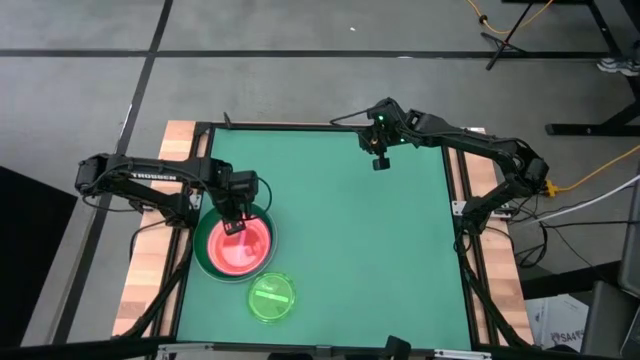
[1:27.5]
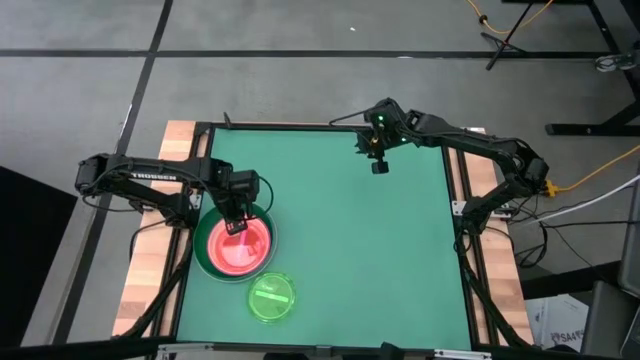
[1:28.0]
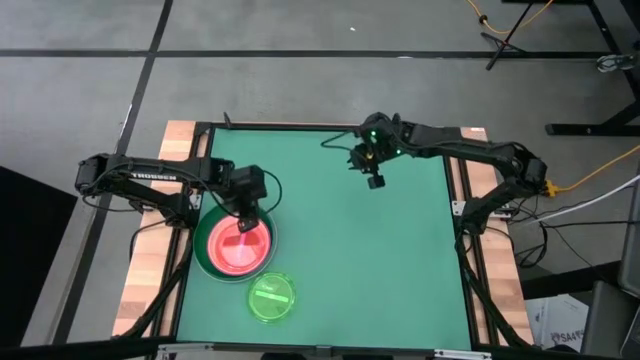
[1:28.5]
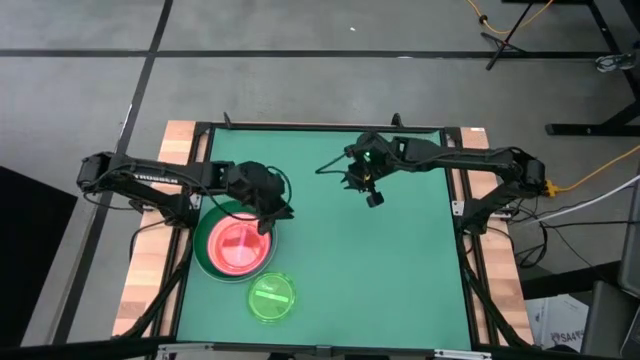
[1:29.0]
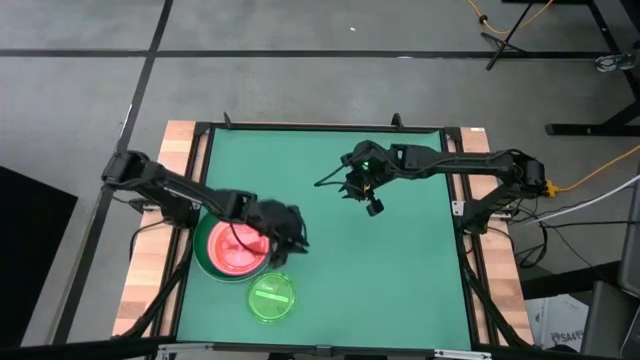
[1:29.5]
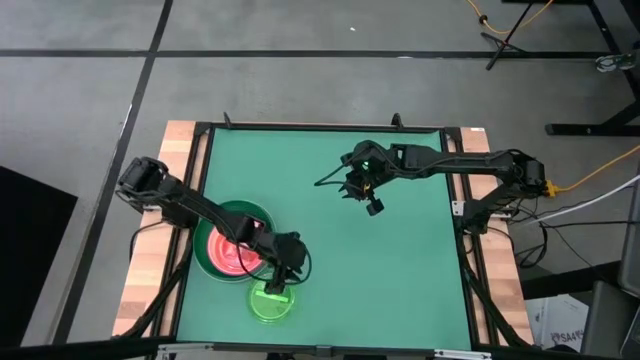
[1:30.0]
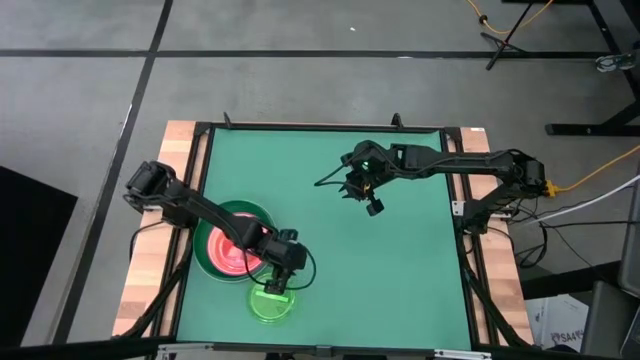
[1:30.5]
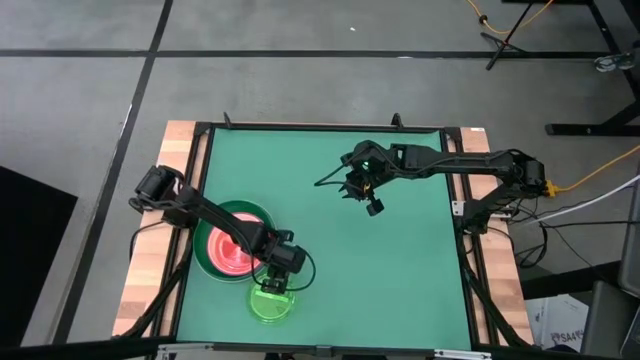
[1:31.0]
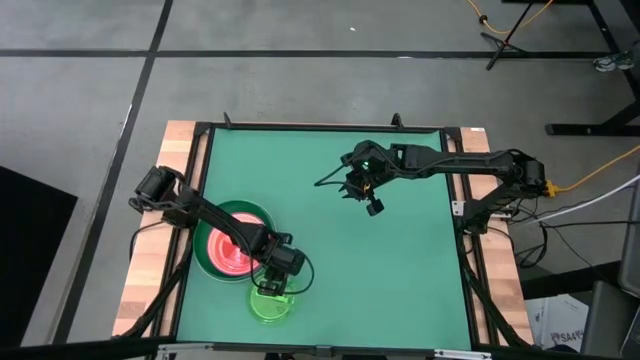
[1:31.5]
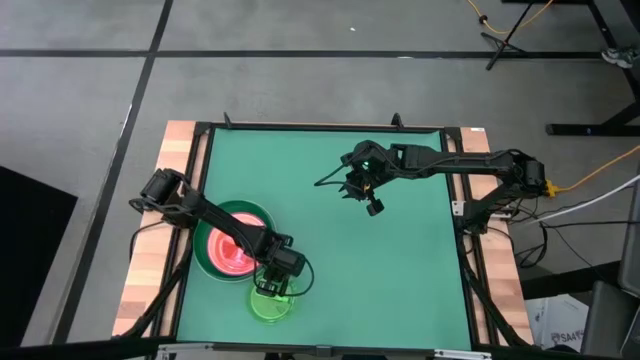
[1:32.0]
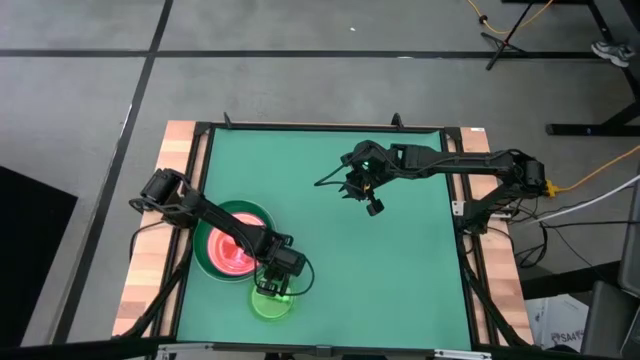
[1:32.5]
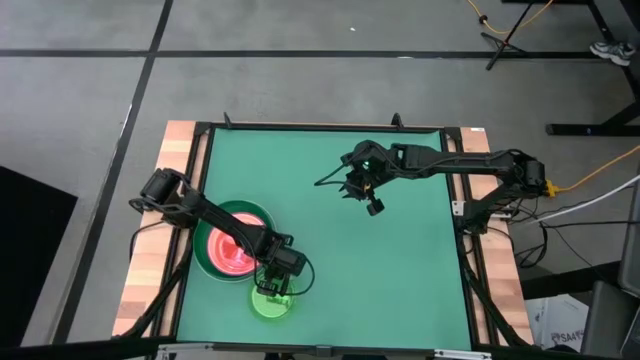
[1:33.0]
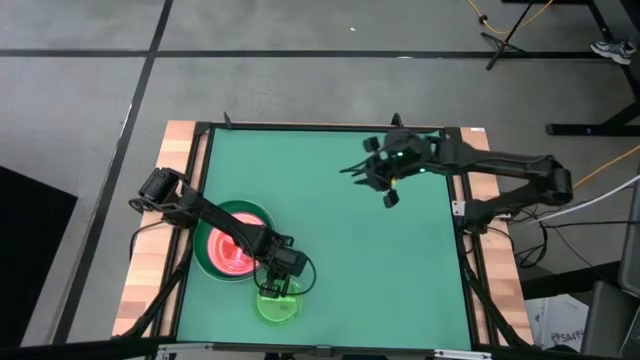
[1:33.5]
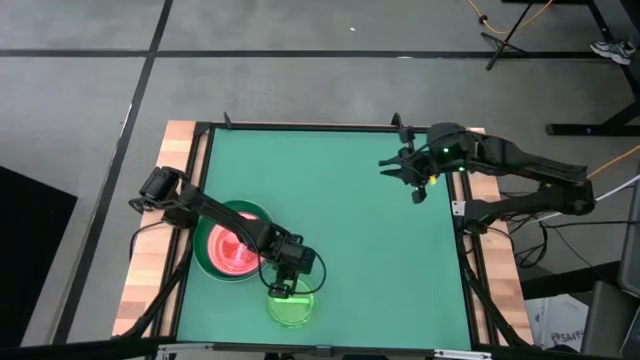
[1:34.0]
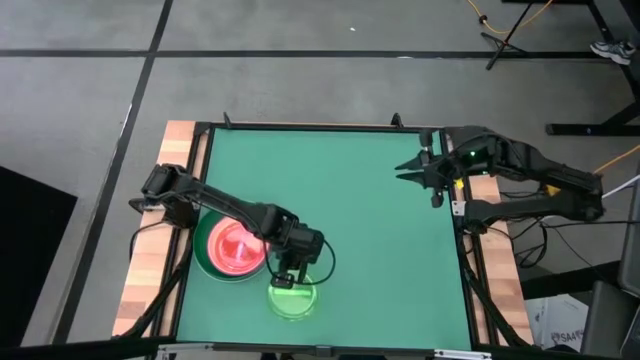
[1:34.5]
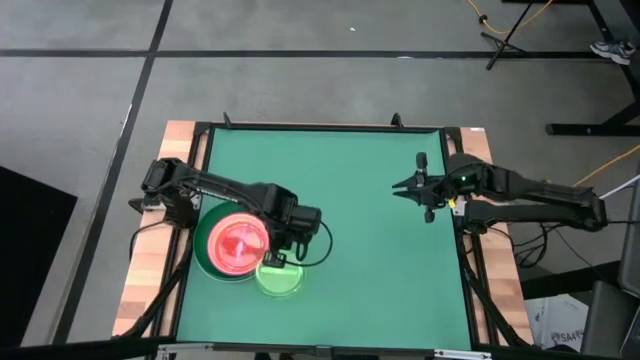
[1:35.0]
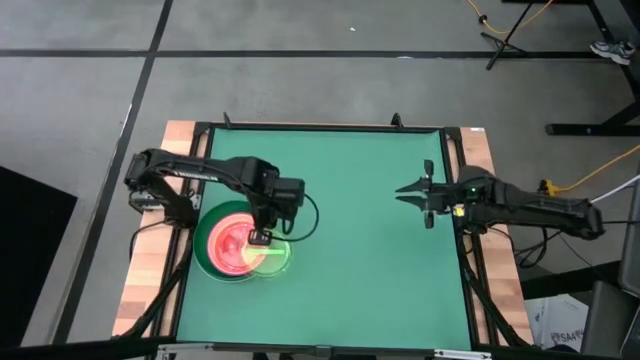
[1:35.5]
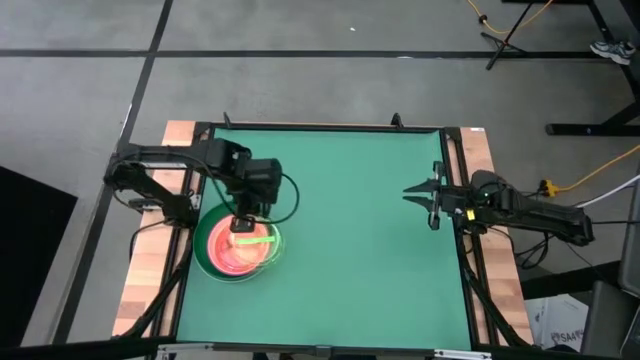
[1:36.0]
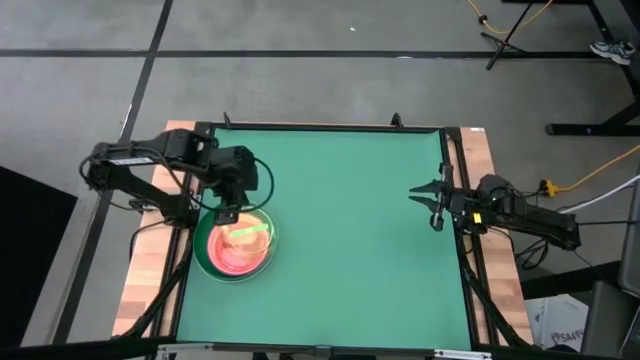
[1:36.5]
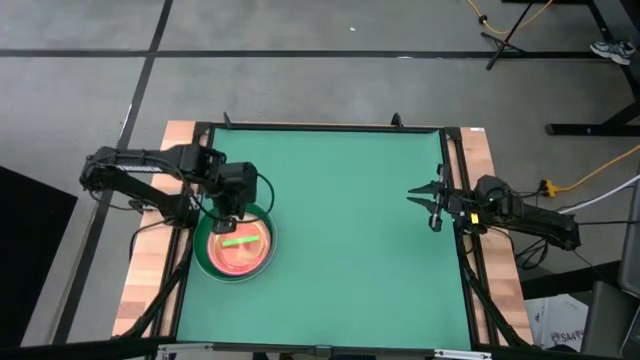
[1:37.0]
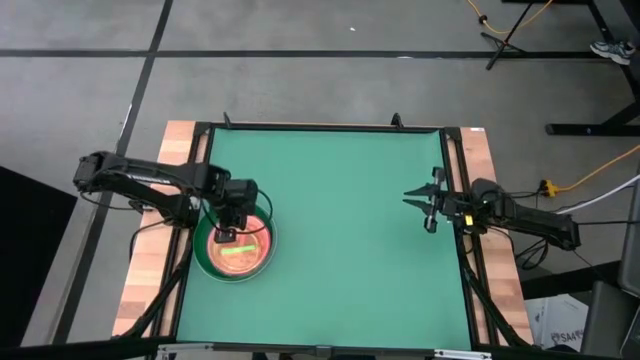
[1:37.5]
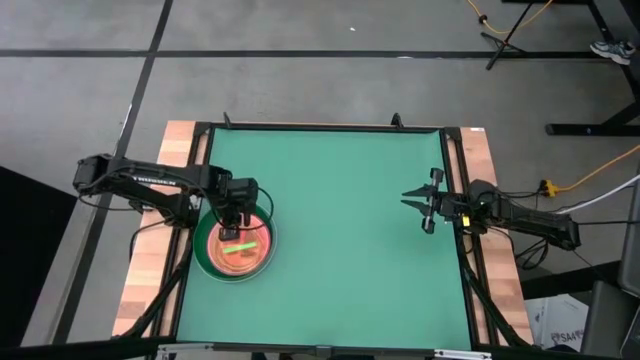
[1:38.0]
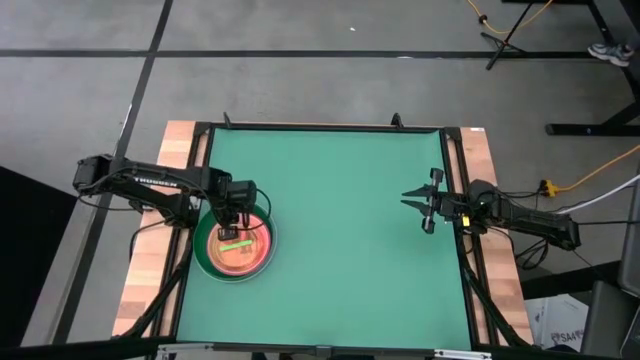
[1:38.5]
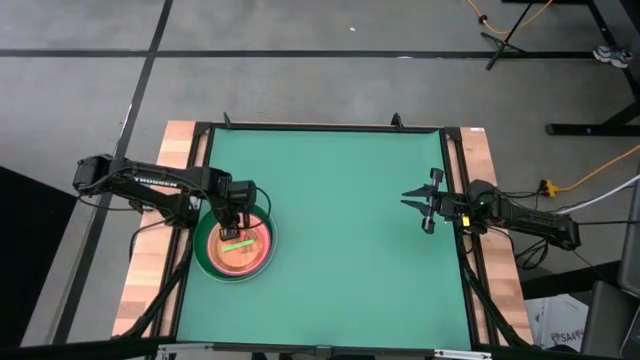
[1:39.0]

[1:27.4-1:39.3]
Task: Stack plastic plates
Stack the light green plate on top of the light pink plate

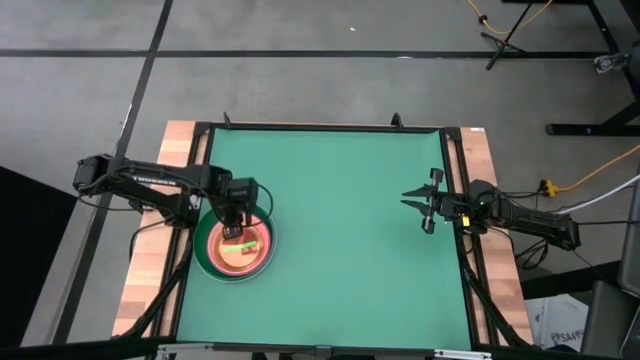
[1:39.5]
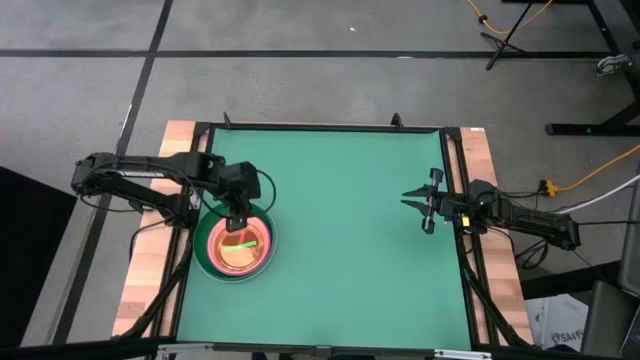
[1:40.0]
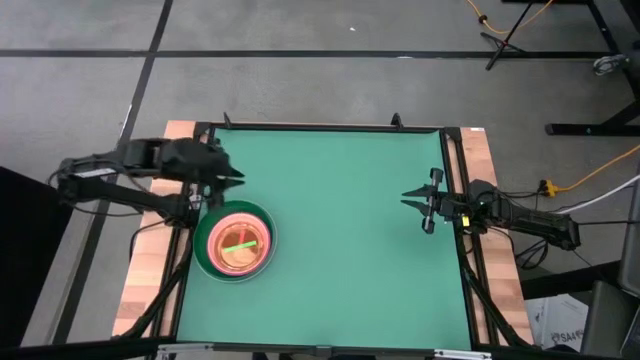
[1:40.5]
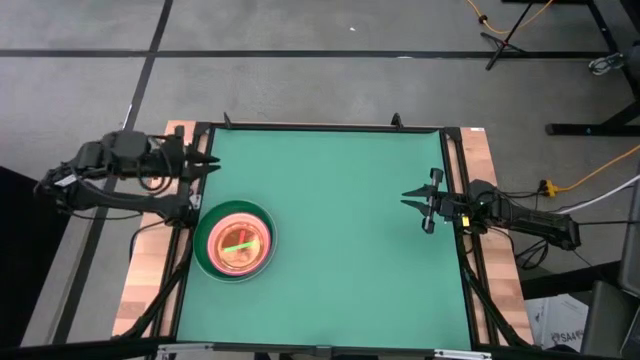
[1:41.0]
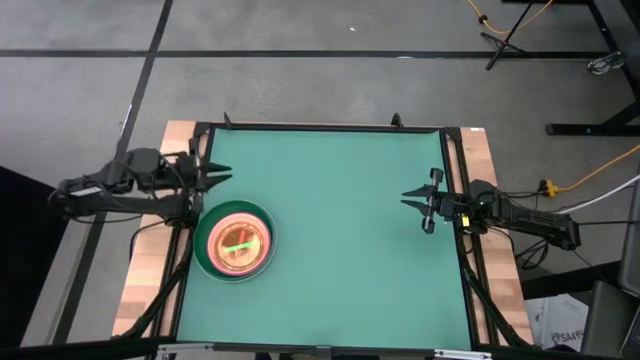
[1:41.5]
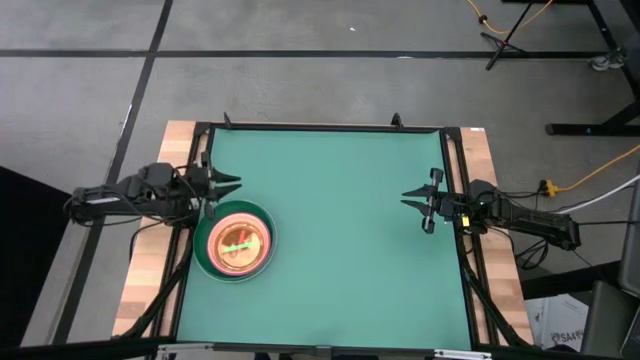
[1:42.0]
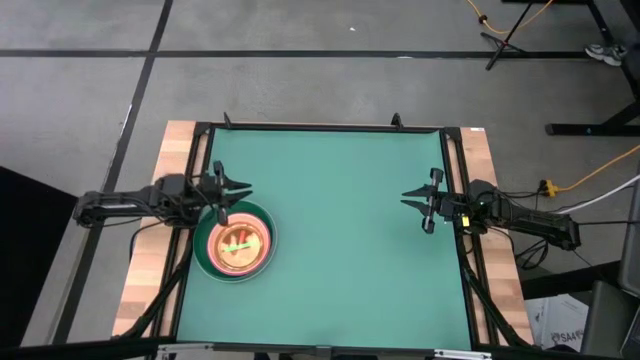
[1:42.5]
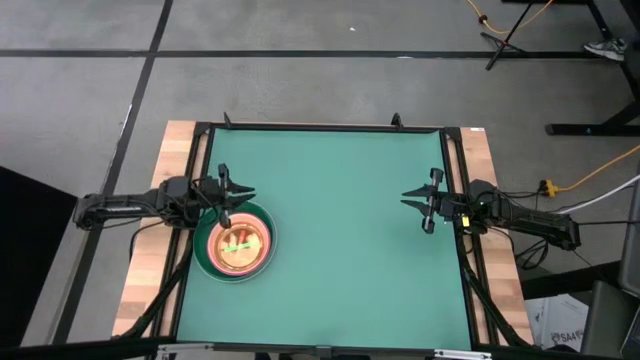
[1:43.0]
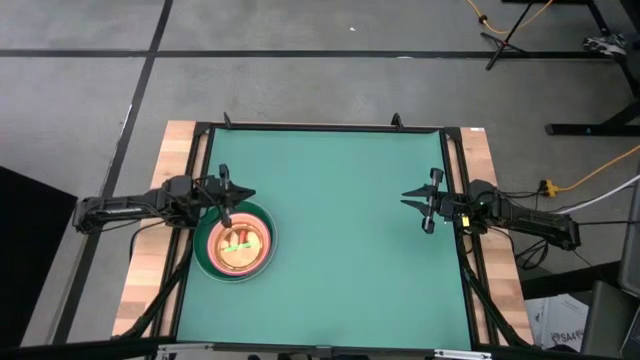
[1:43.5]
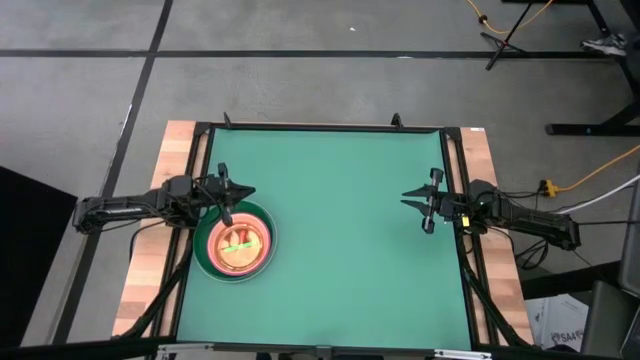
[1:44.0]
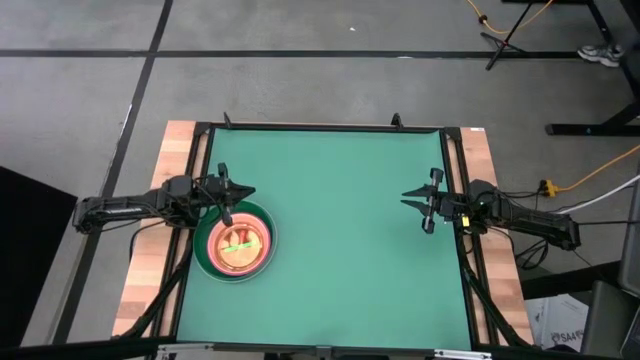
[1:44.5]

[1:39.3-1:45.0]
Return to Home Position

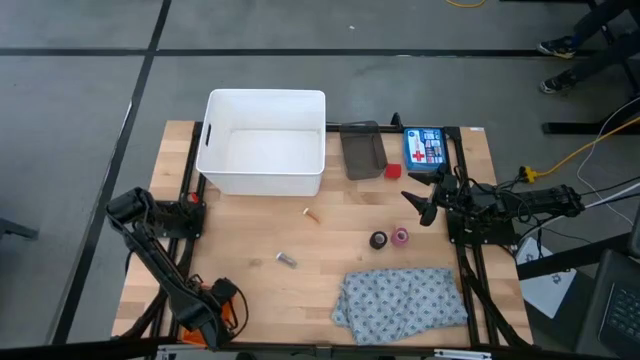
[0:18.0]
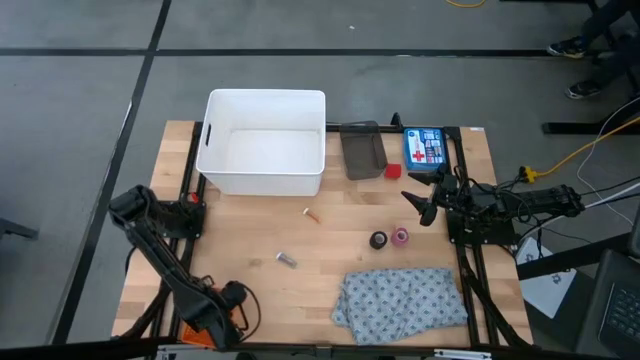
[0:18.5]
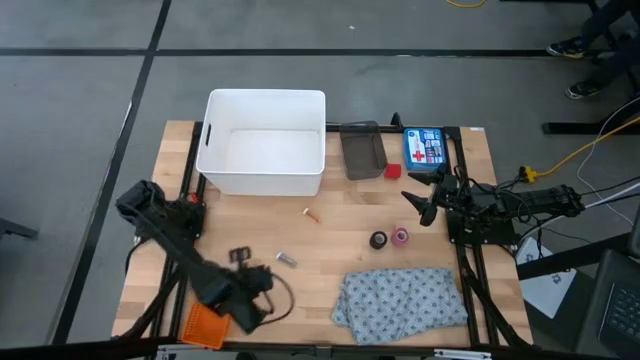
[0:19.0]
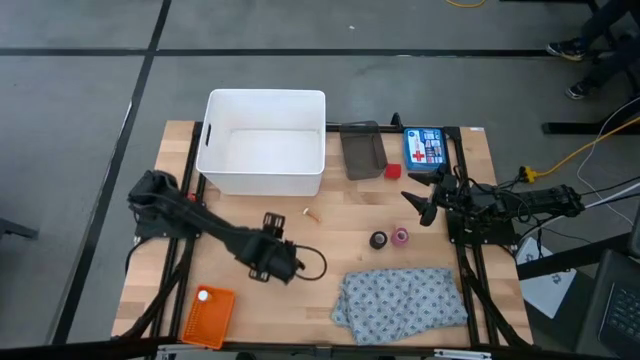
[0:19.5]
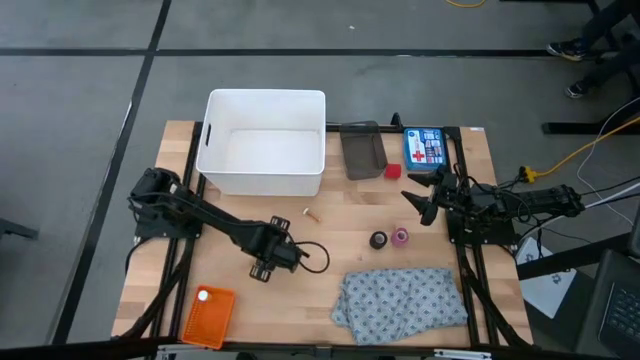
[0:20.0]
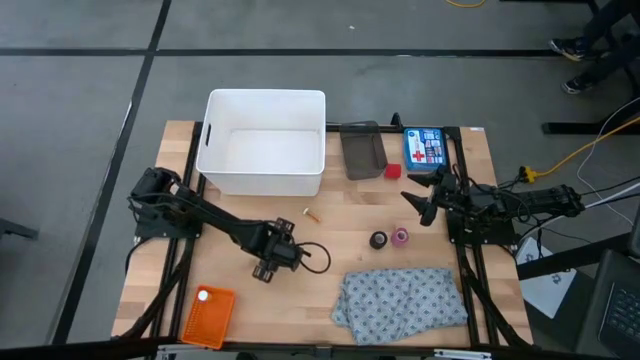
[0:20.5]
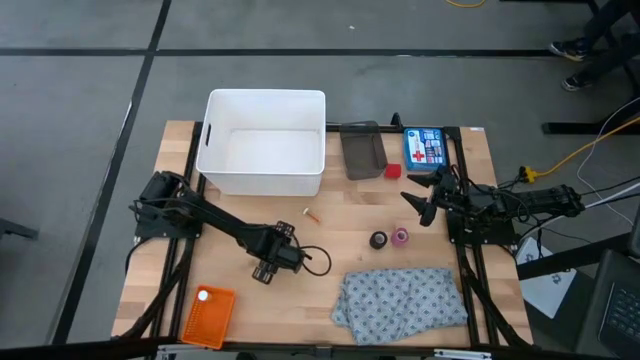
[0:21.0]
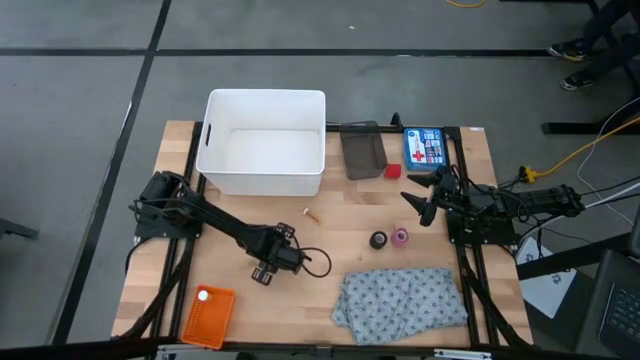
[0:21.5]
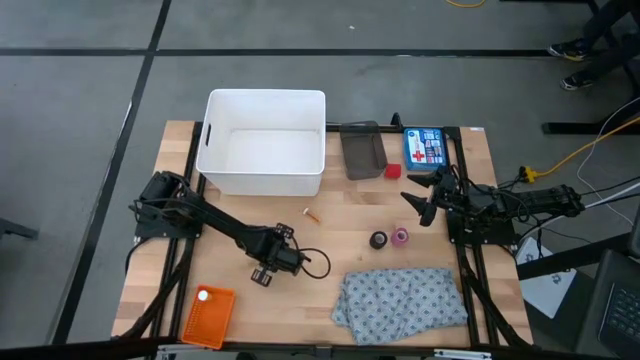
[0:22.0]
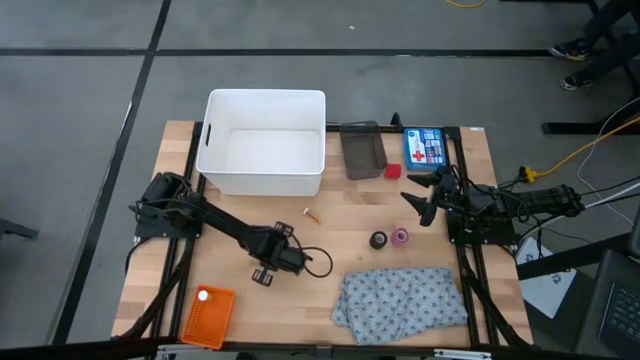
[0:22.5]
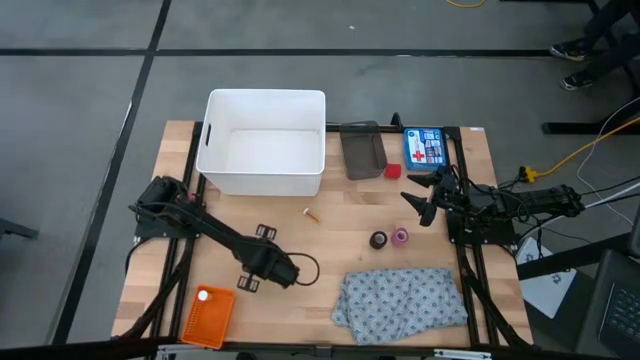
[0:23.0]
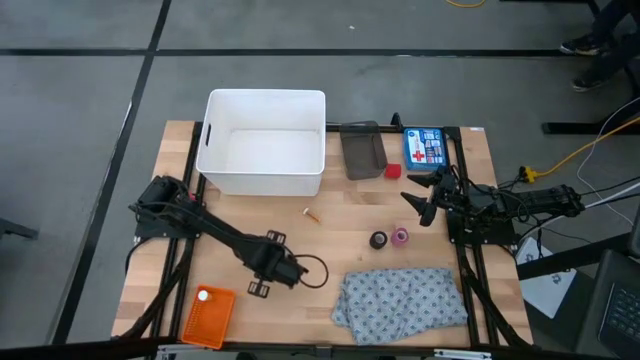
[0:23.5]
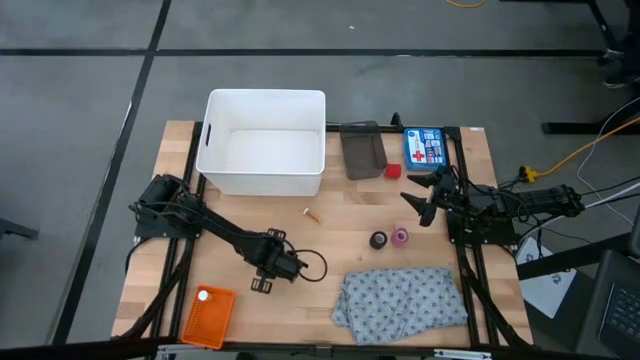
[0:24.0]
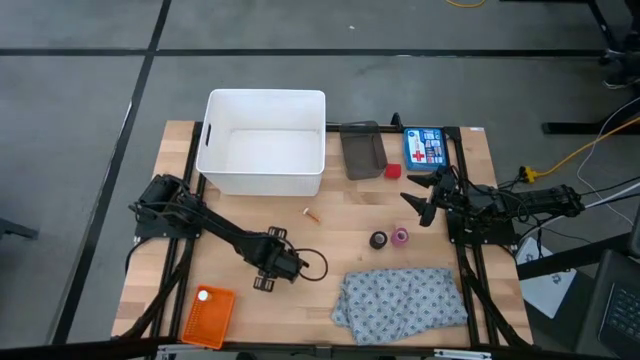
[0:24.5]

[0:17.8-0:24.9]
Task: Pick & place medical supplies in basket/bin
Adjust the blue pill bottle
